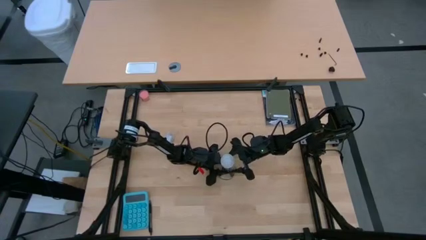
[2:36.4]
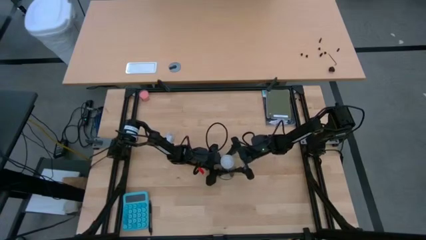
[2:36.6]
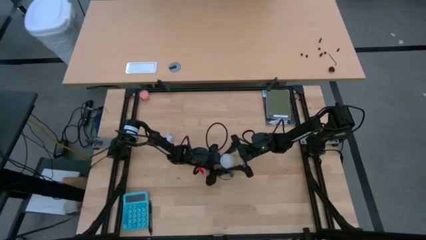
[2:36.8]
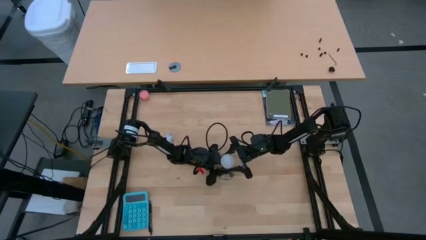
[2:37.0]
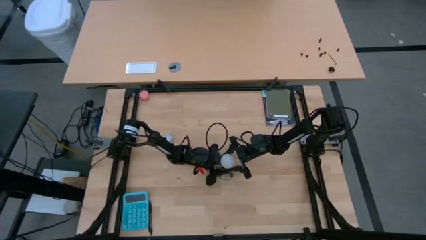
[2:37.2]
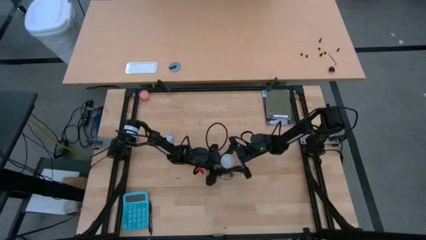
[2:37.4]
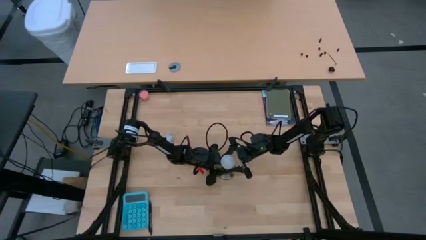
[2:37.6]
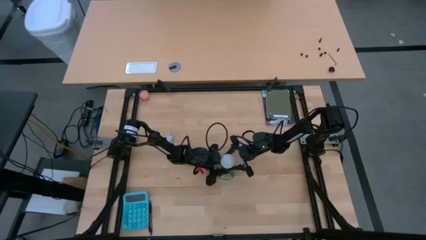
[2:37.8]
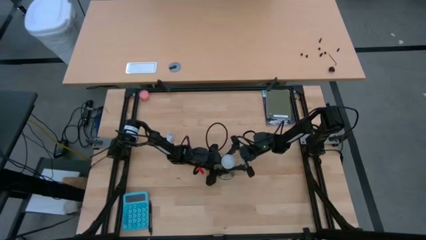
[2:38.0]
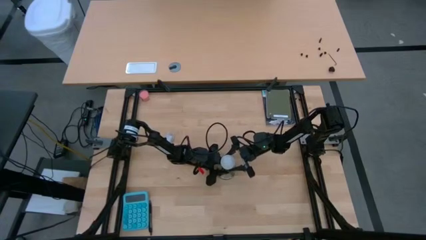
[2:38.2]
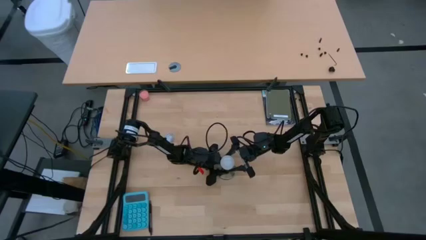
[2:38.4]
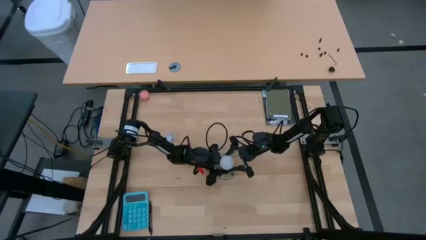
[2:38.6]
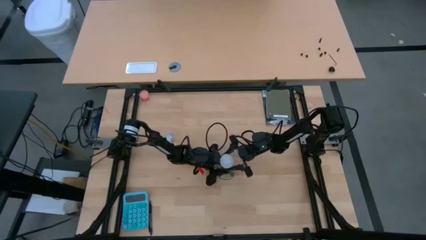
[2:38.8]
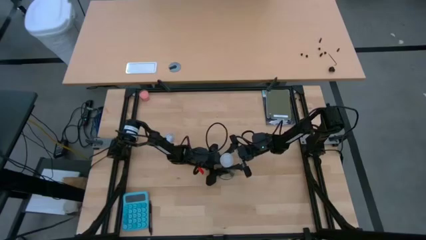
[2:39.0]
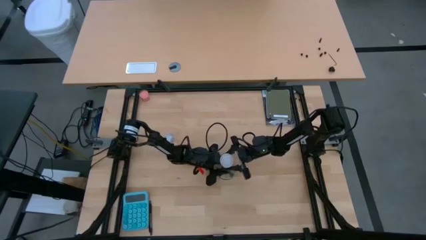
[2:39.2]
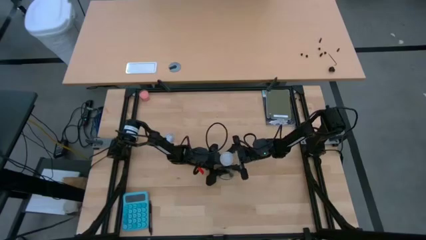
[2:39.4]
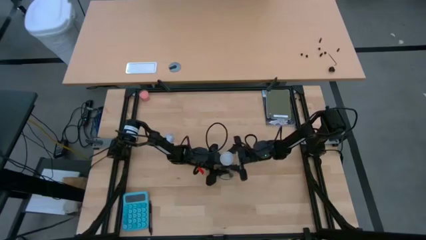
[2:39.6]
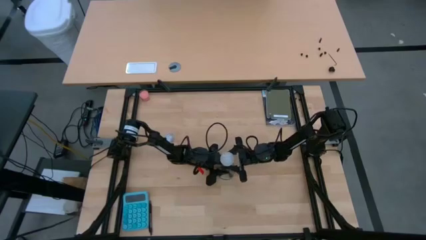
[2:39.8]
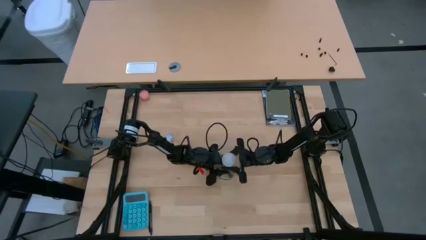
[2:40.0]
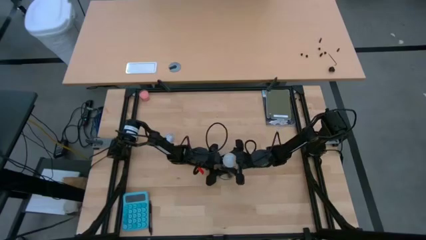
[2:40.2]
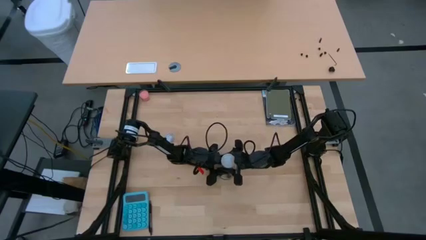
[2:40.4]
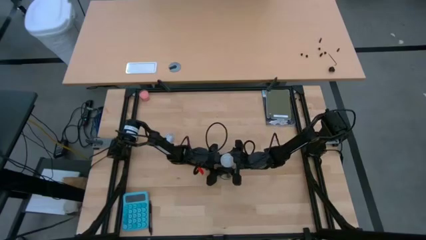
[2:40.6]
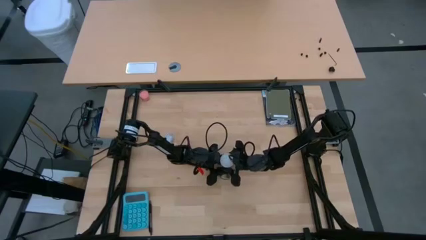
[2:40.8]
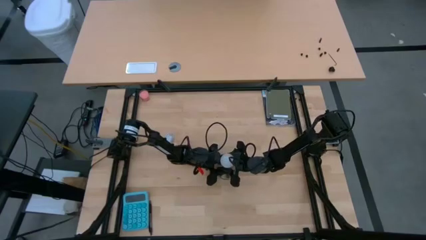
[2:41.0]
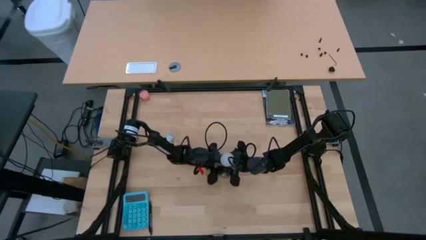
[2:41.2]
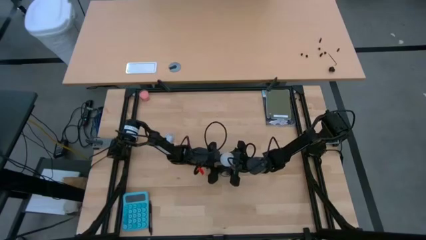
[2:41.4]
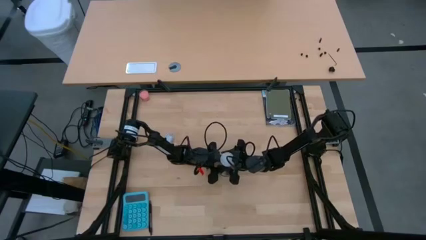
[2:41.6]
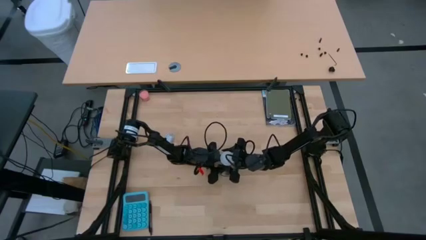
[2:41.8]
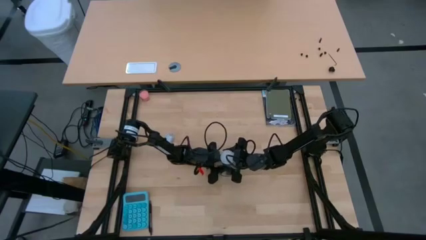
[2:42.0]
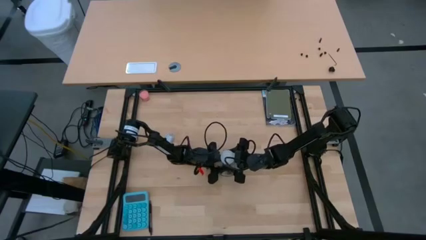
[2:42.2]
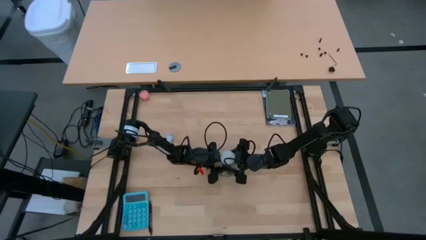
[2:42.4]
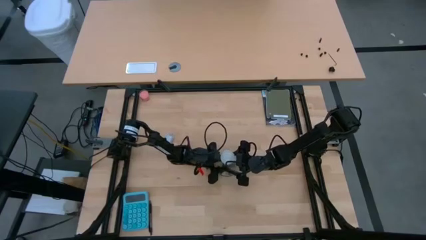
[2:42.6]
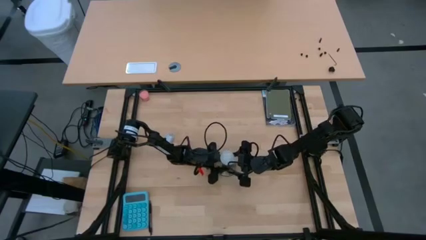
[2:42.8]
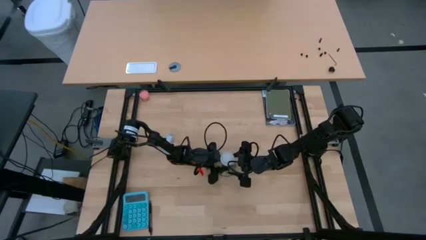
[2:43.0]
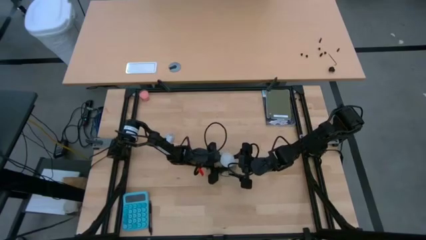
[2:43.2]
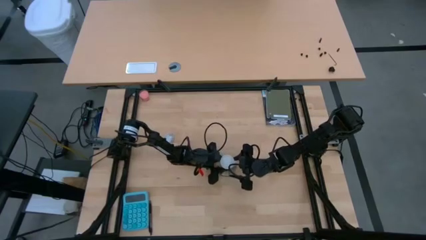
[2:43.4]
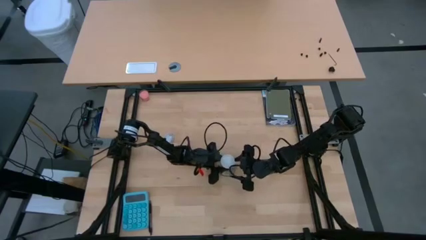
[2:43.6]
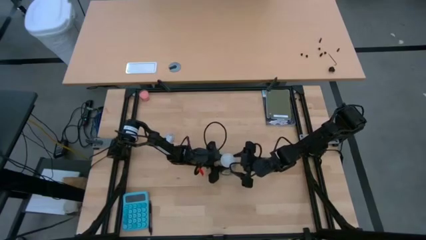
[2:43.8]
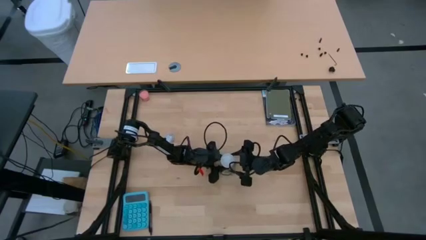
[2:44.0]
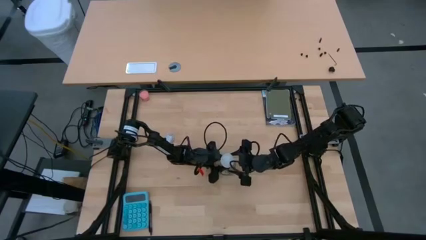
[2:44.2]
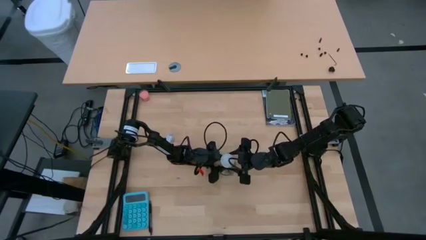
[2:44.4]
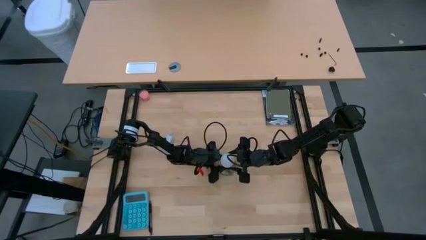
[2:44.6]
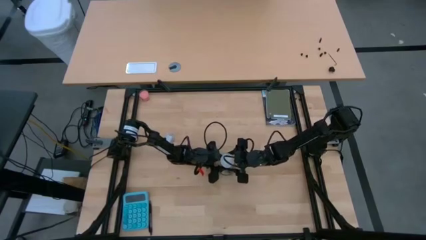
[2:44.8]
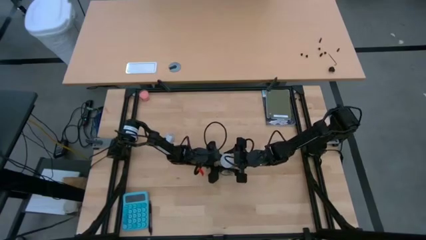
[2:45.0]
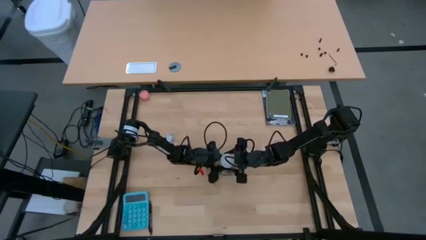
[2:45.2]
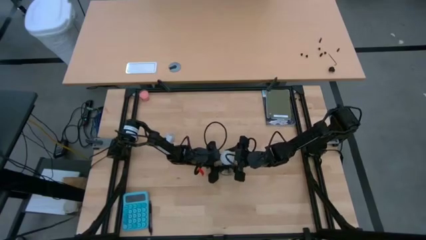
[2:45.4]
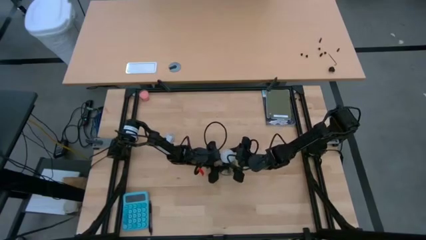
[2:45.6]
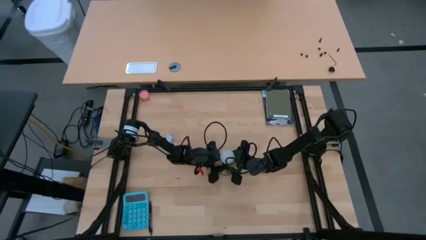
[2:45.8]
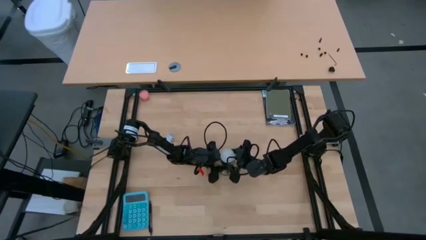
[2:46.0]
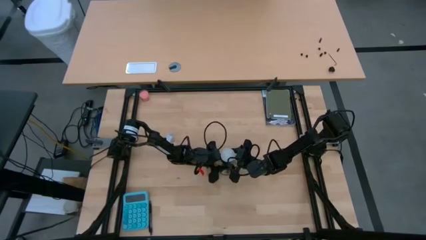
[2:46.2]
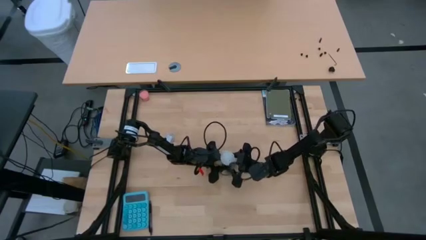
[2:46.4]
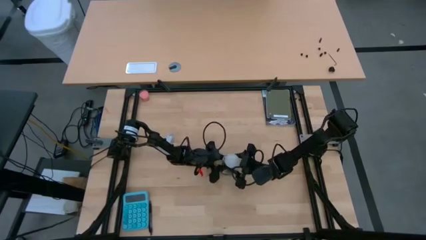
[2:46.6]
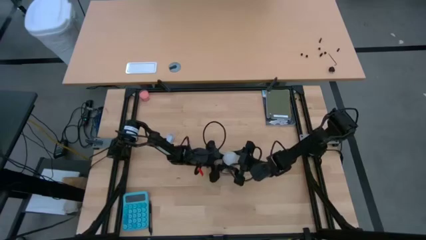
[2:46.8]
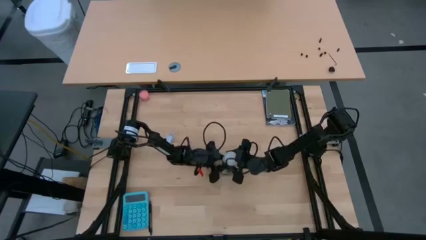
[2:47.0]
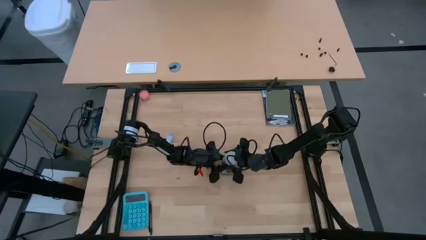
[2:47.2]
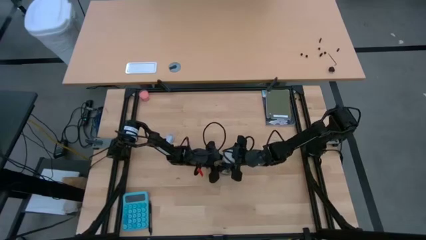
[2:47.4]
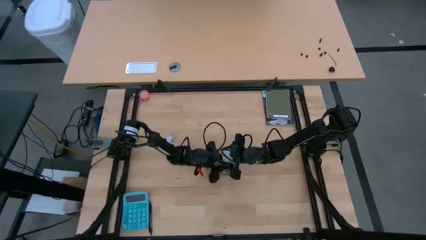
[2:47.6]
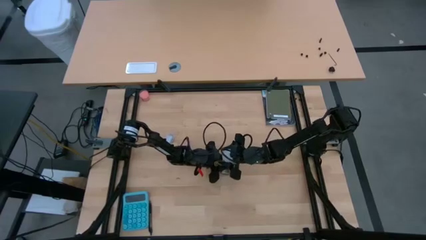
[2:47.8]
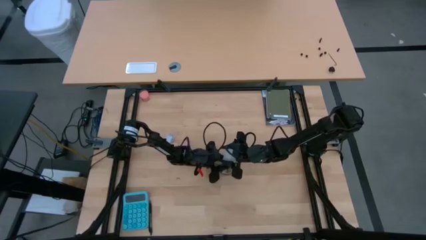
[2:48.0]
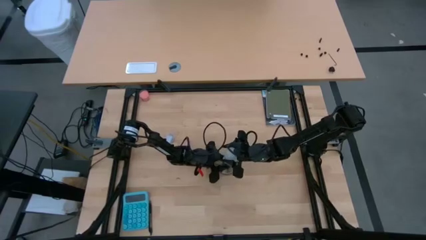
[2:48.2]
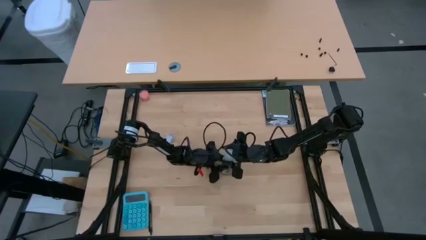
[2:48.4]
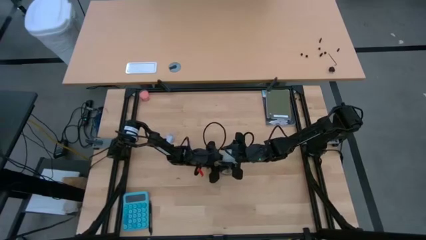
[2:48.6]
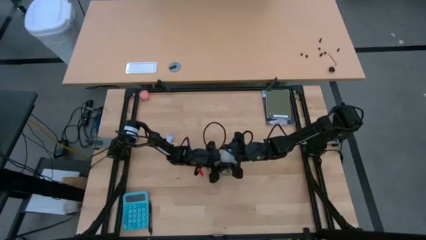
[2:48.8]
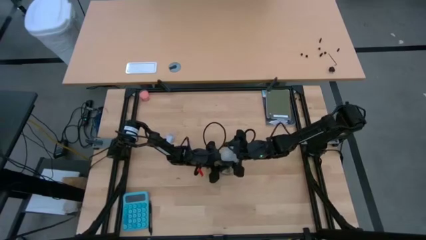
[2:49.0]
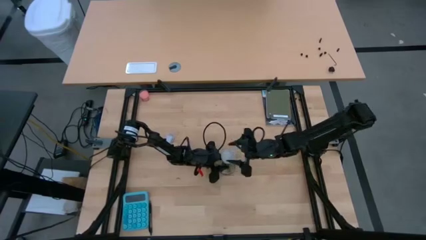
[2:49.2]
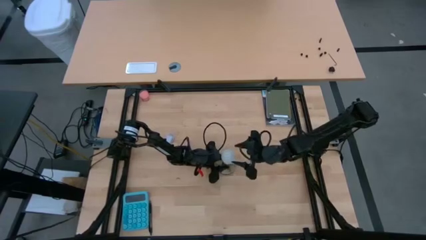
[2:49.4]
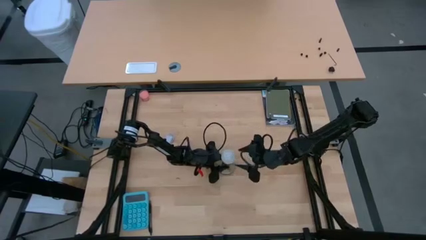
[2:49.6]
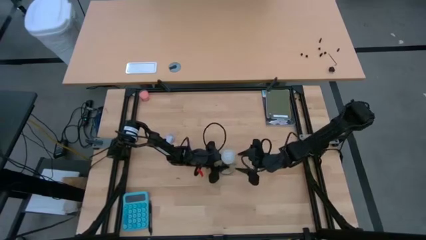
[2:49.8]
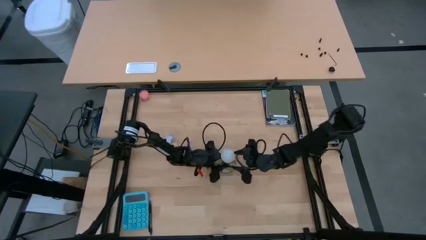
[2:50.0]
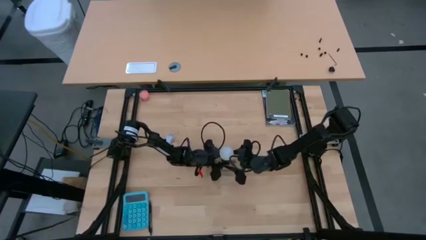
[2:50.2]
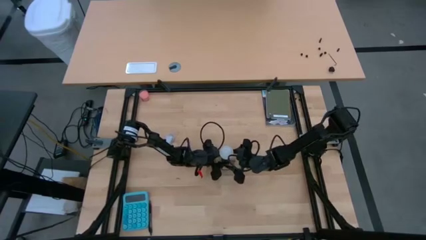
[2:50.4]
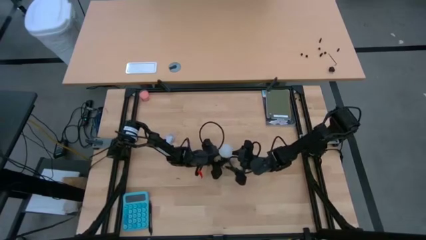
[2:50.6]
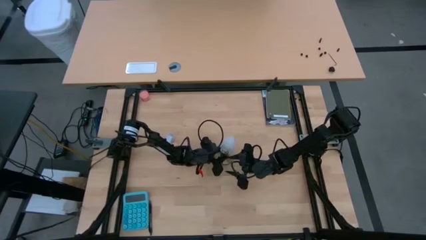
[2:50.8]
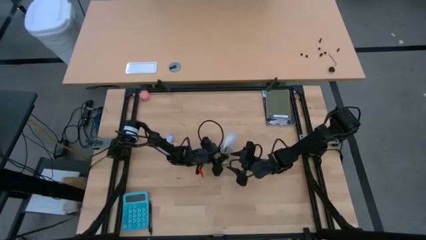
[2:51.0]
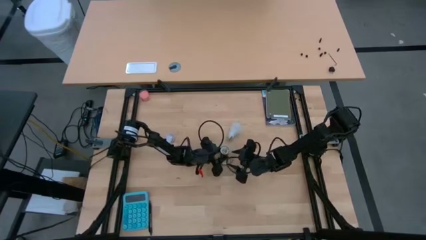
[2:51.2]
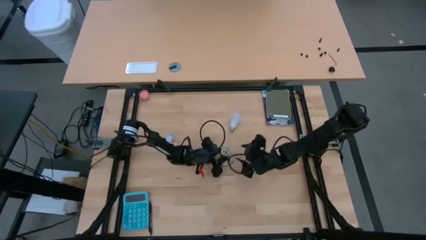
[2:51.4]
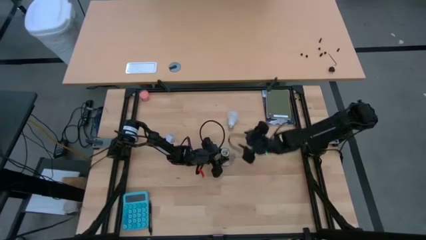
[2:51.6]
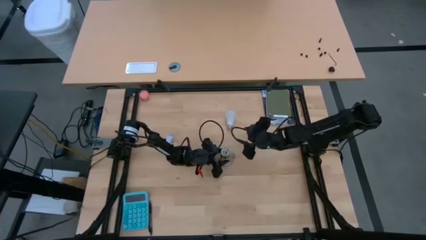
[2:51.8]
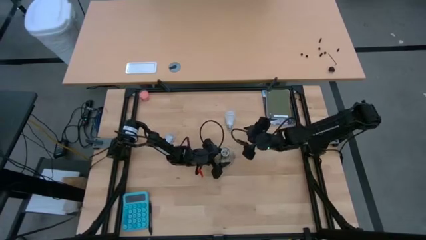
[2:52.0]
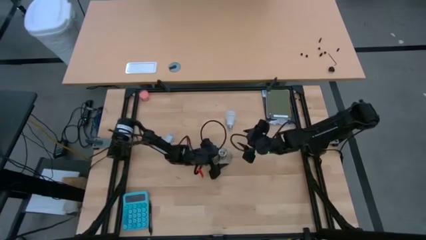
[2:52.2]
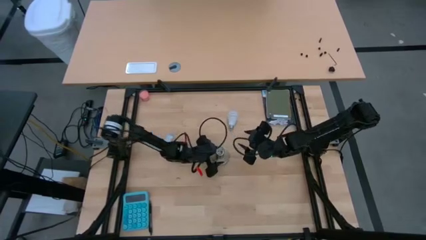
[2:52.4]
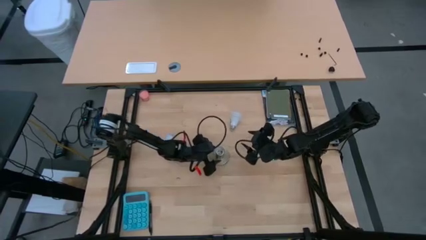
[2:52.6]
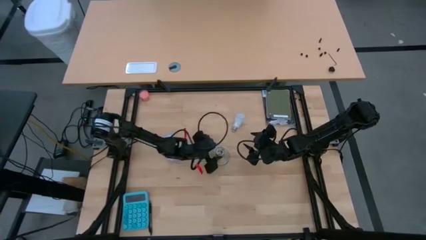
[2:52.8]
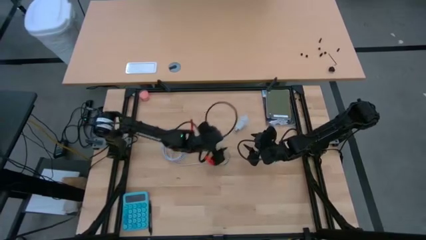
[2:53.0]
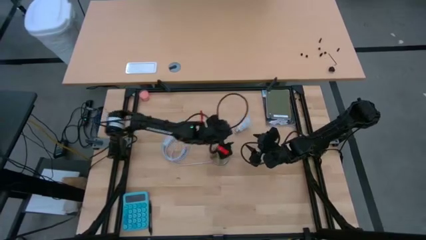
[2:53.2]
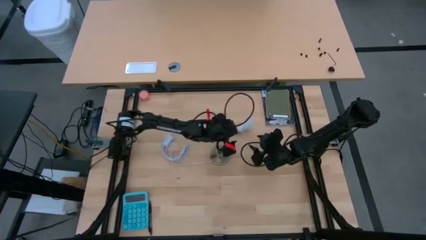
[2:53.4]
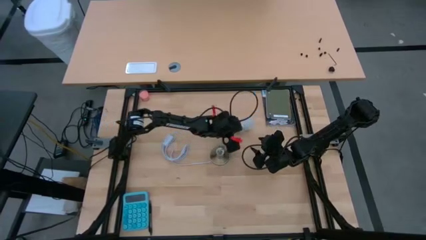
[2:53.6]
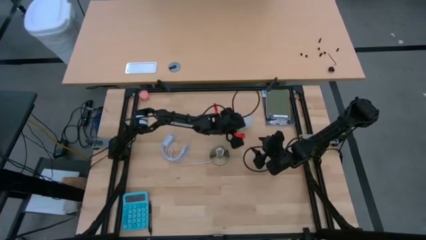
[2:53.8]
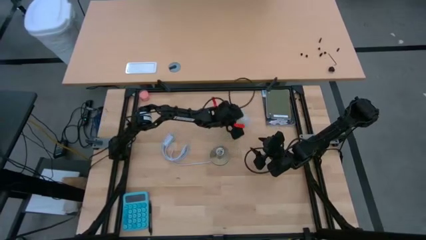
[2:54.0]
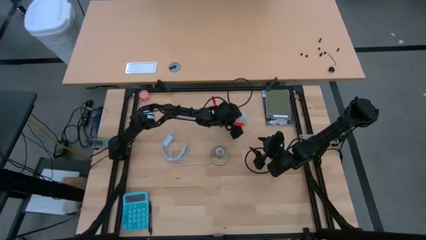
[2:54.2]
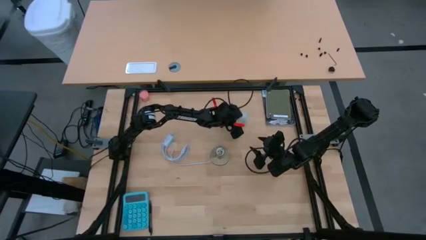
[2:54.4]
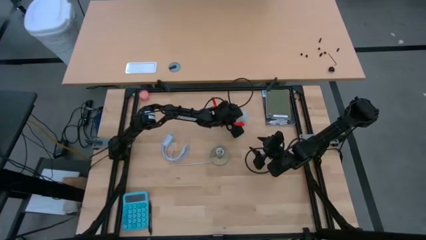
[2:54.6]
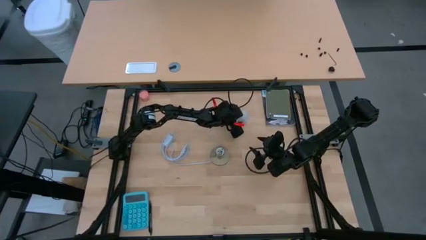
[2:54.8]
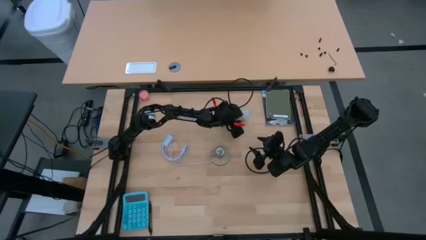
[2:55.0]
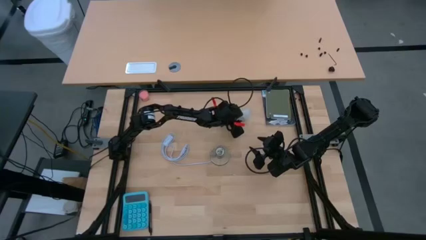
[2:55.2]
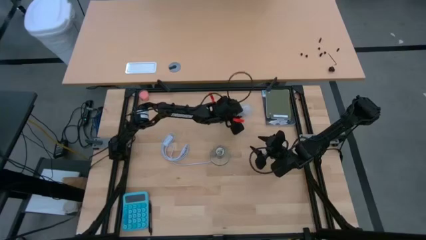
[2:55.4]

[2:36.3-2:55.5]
Task: Screw lightbulb
Insert the lightbulb into the lamp holder
